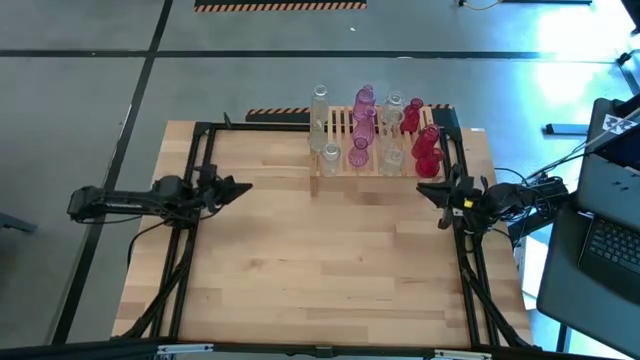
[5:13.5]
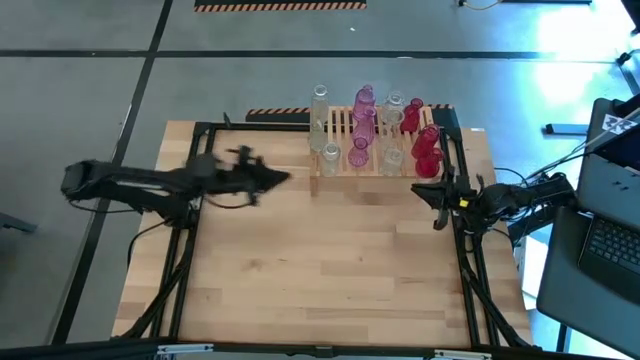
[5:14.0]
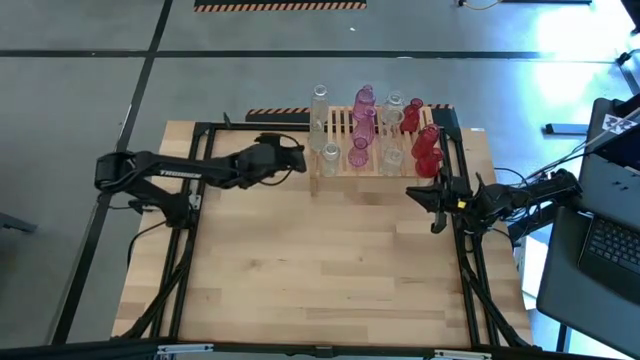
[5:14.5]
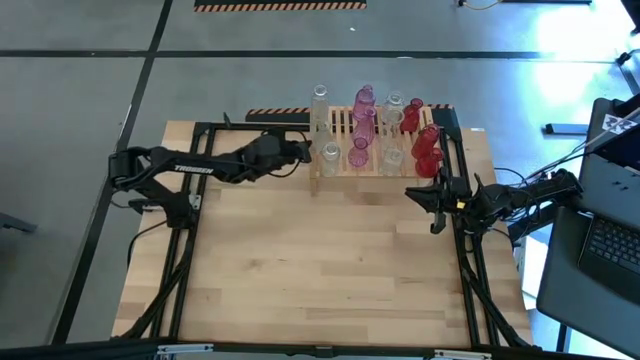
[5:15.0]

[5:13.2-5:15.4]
Task: sort vases onto shelf
Adjust the transparent vase on the shelf

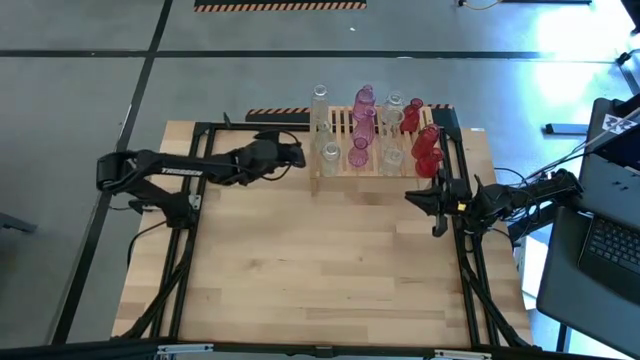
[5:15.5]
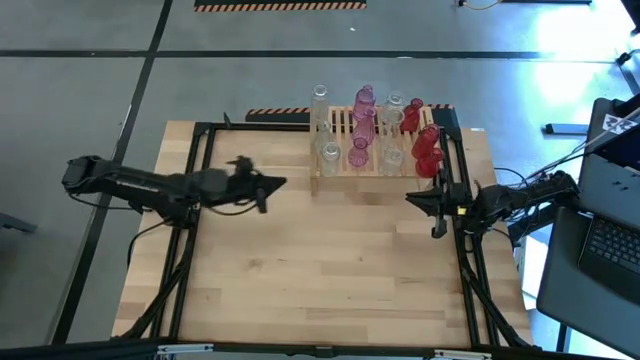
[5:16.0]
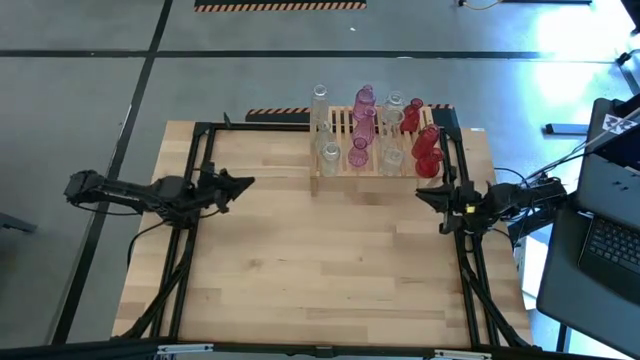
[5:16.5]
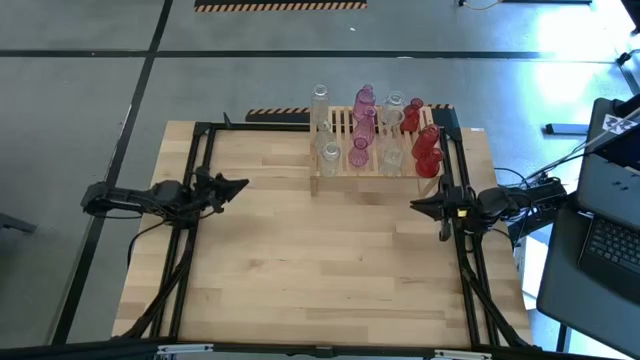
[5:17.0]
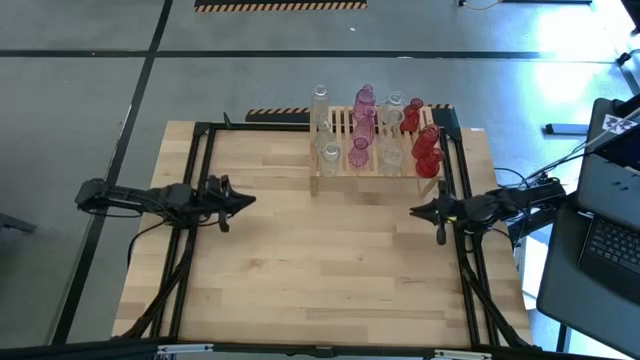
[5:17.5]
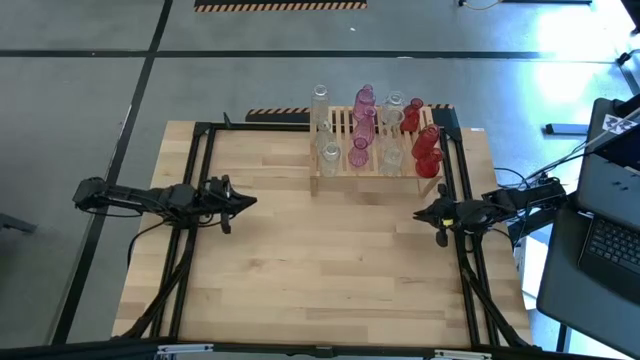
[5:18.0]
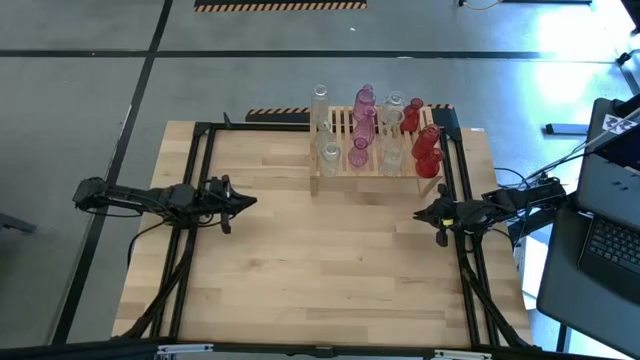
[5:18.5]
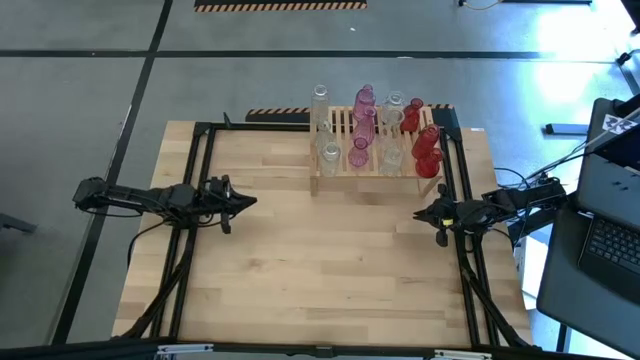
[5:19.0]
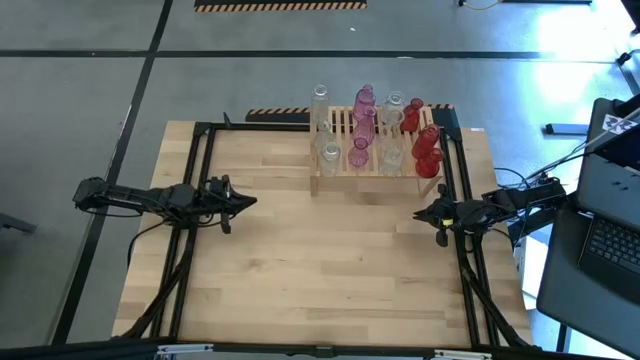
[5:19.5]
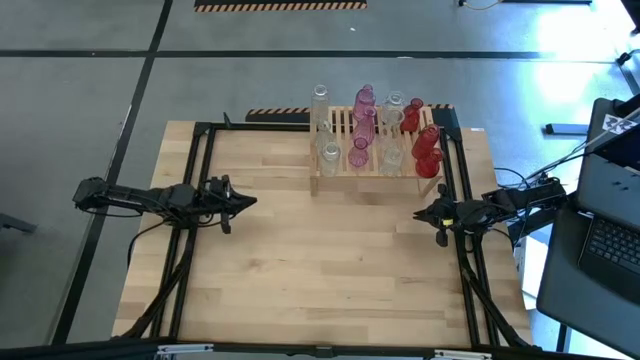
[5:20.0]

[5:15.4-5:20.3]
Return to Home Position

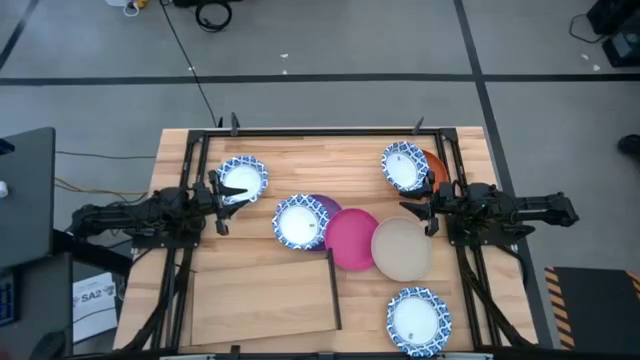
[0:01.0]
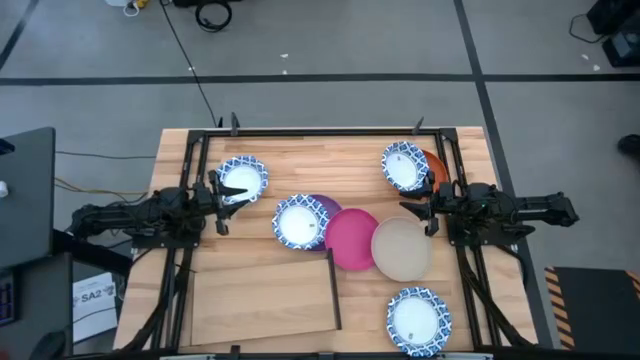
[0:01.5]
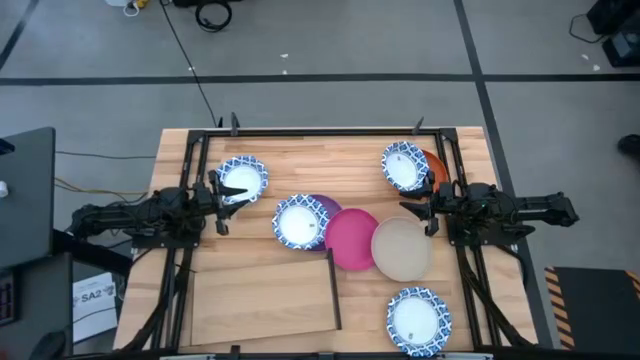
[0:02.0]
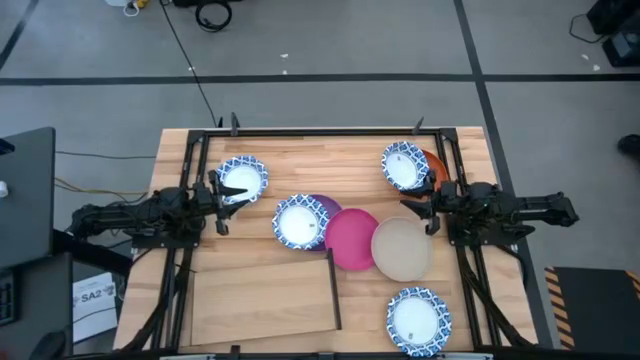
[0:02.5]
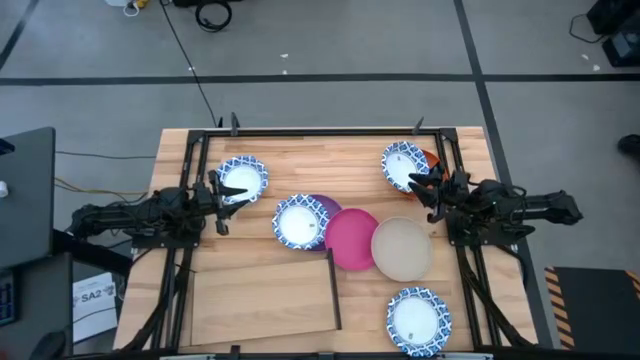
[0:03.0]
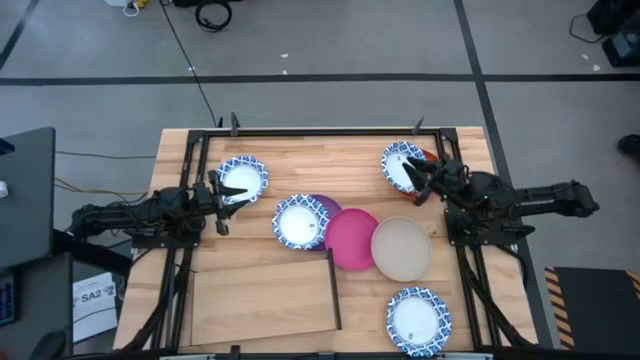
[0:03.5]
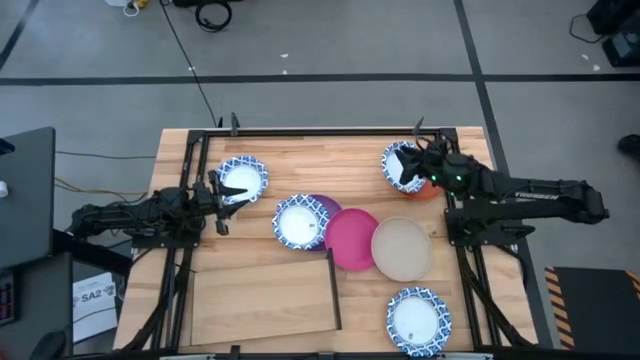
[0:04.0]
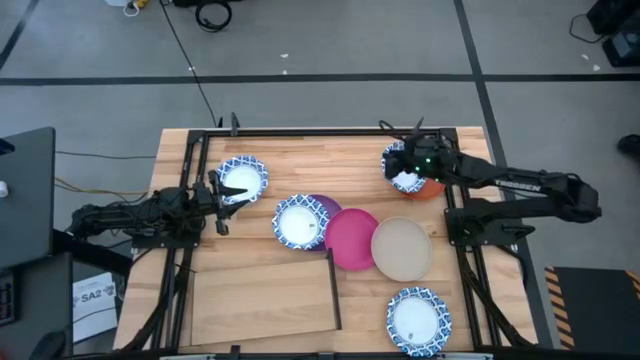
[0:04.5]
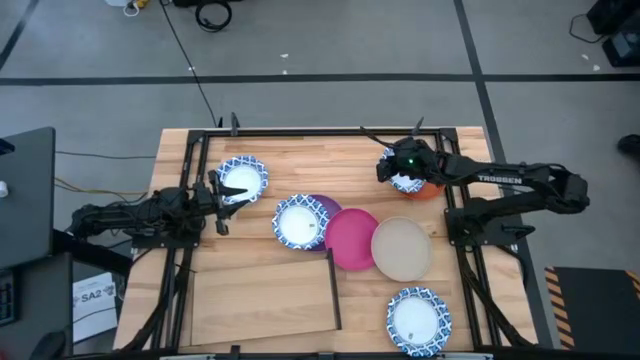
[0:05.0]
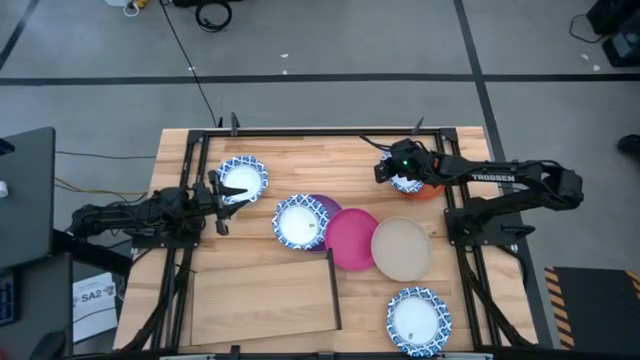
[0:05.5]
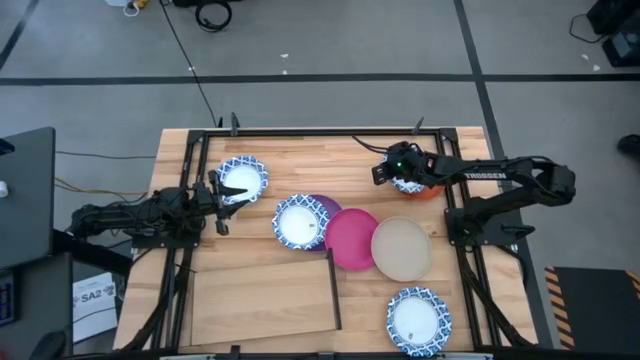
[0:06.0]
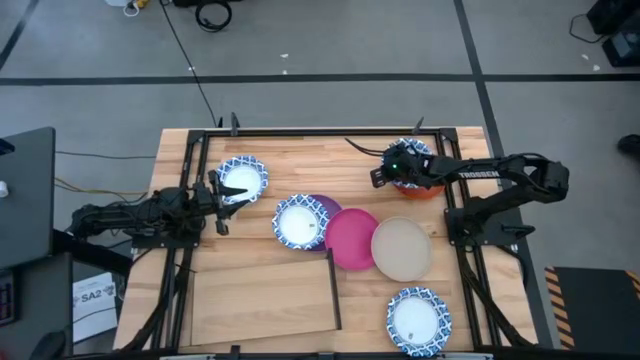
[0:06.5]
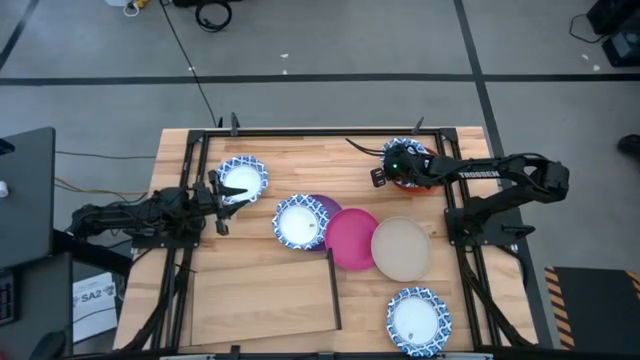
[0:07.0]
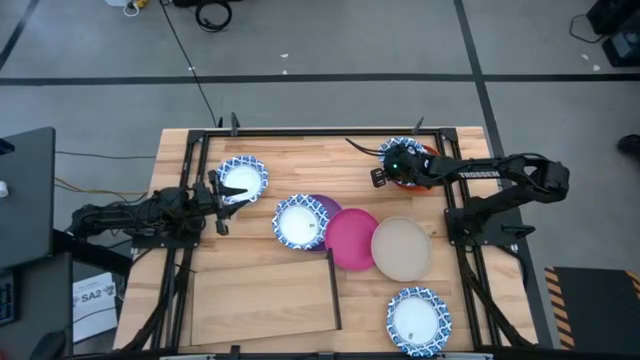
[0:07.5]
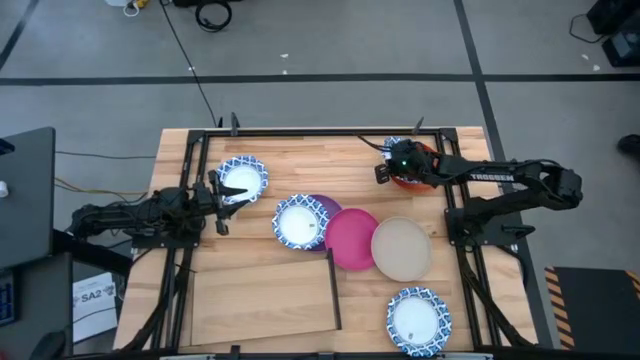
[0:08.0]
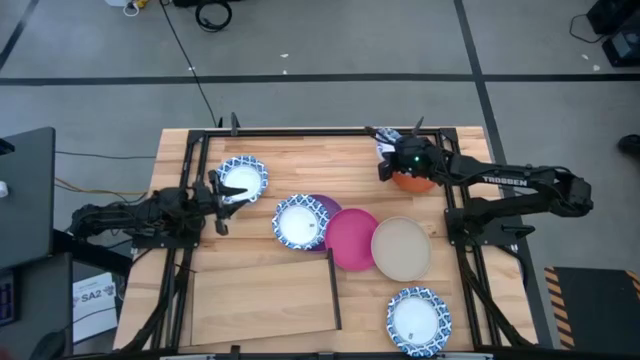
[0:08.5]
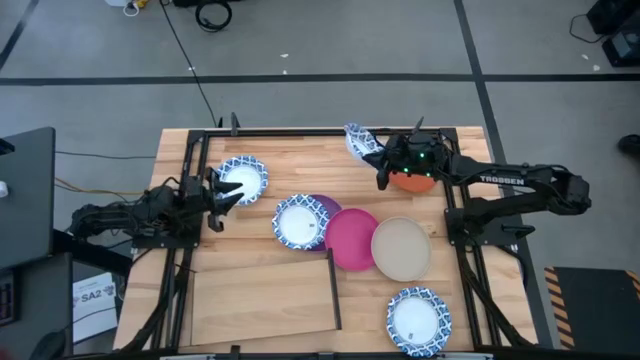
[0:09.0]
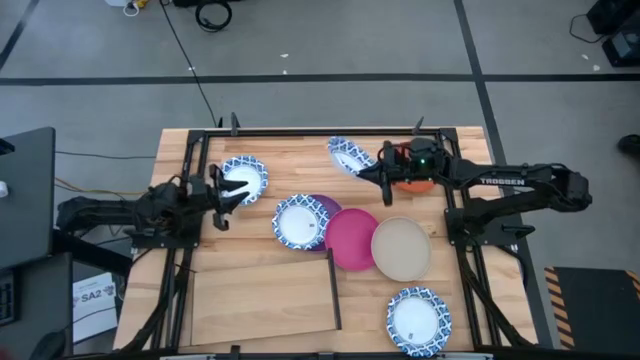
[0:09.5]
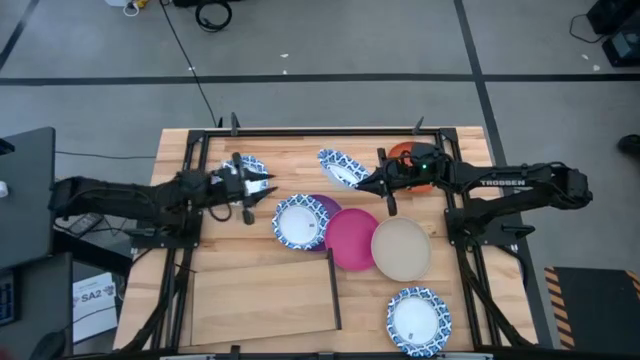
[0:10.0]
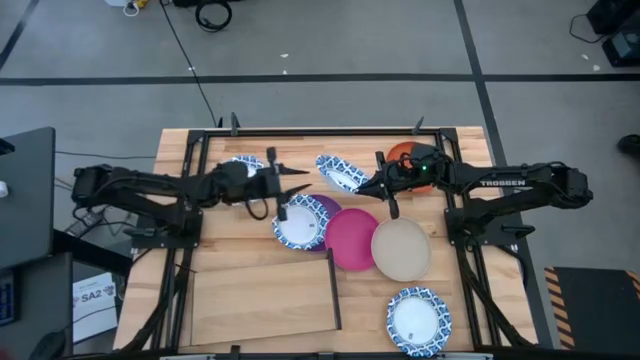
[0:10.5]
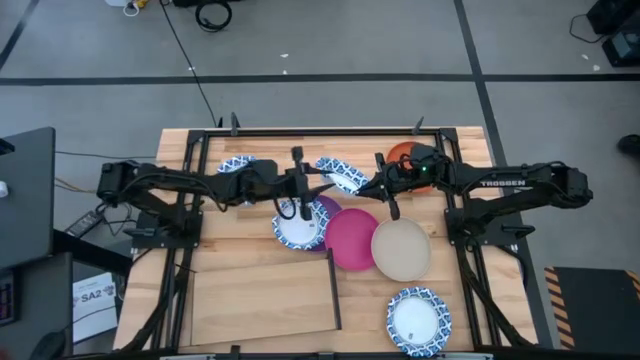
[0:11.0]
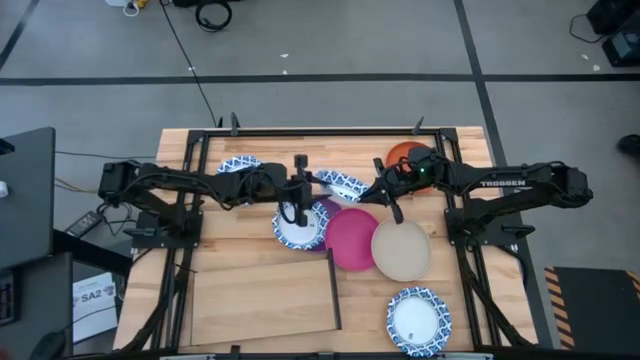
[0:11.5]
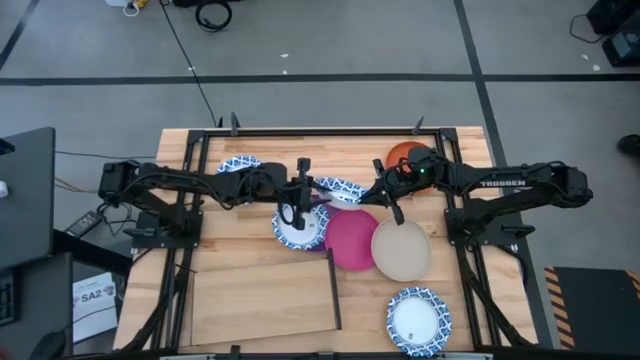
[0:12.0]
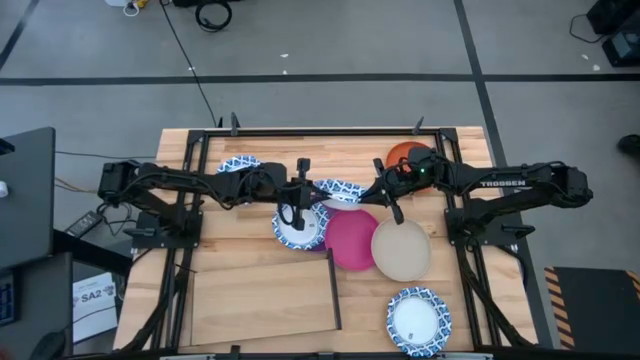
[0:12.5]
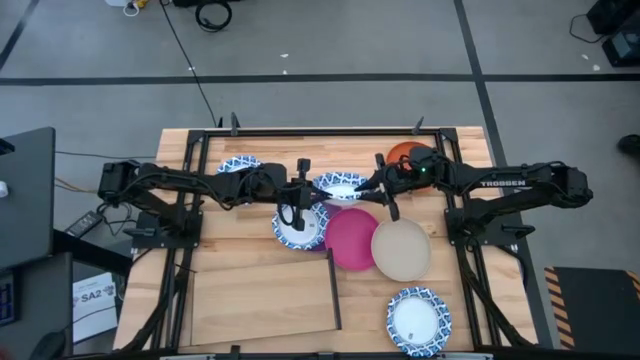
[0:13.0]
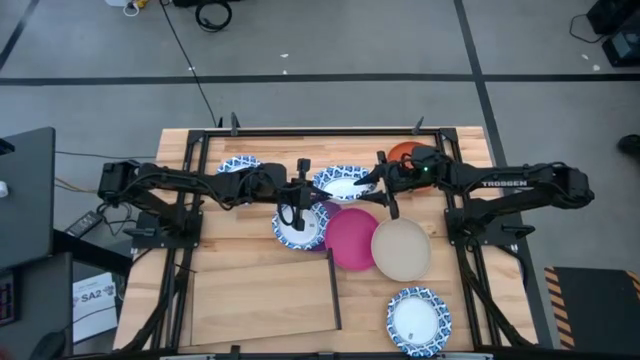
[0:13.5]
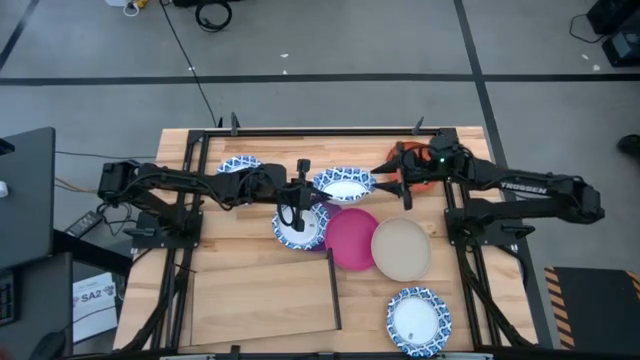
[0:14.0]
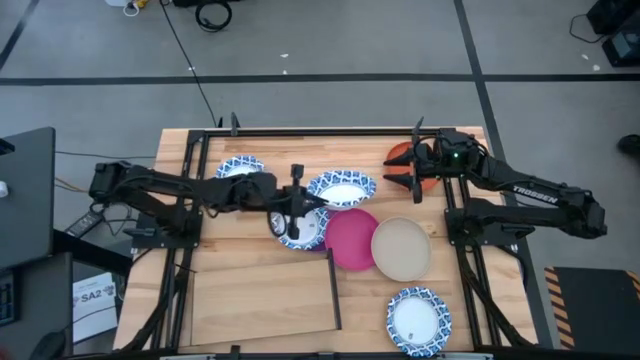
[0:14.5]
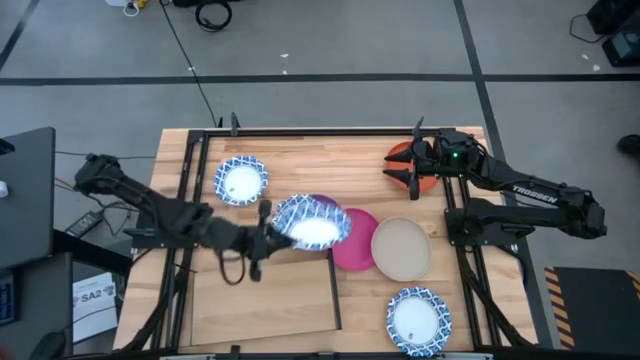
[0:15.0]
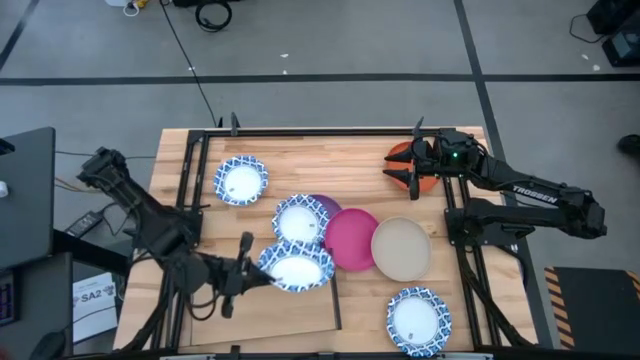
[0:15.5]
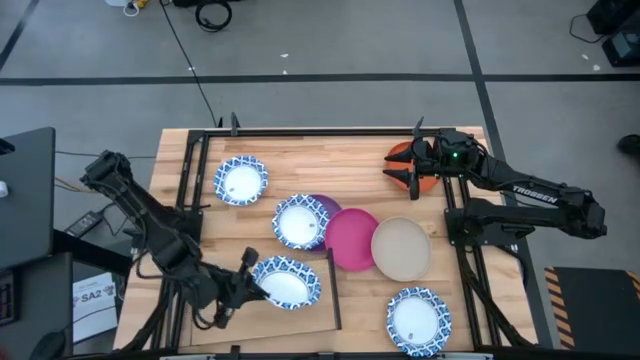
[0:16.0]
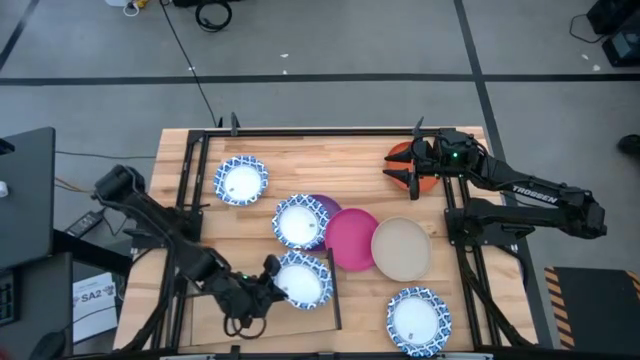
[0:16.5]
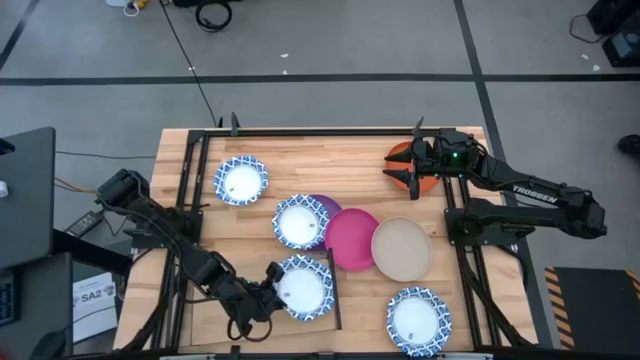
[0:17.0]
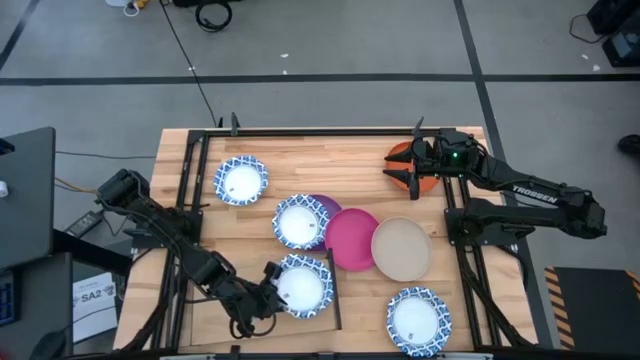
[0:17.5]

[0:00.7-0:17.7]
Task: Place and stack plates onto a shelf
Put the blue patterned bowl on the shelf
